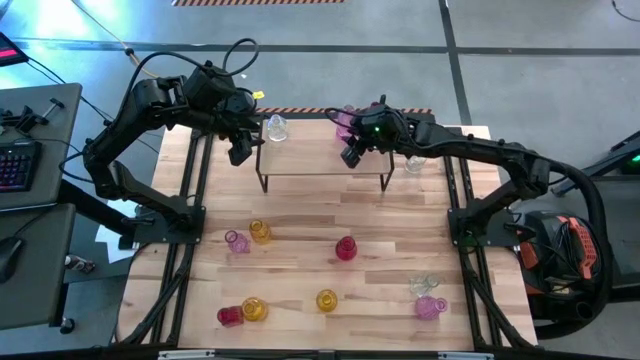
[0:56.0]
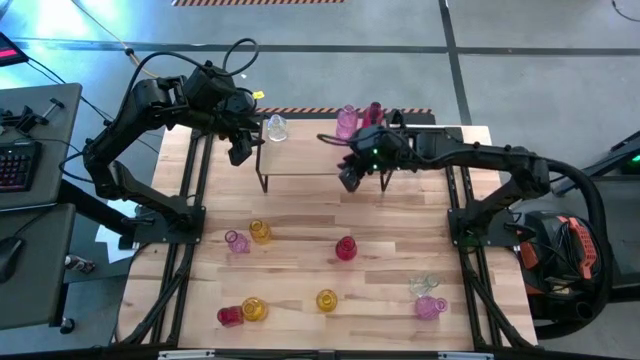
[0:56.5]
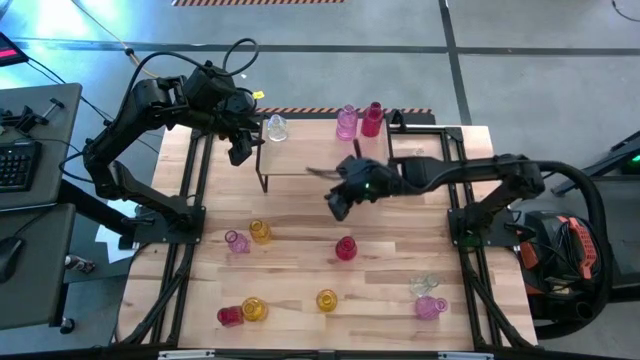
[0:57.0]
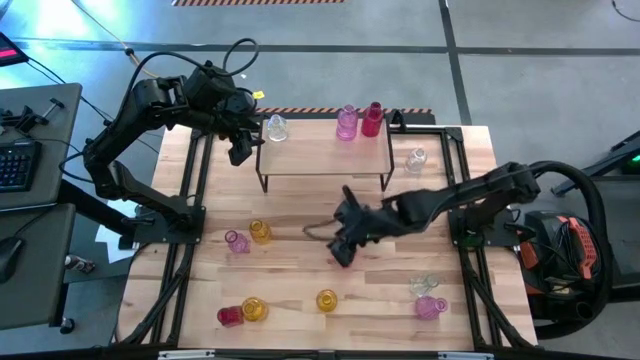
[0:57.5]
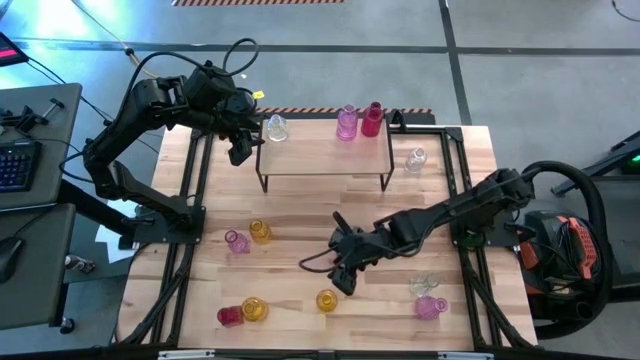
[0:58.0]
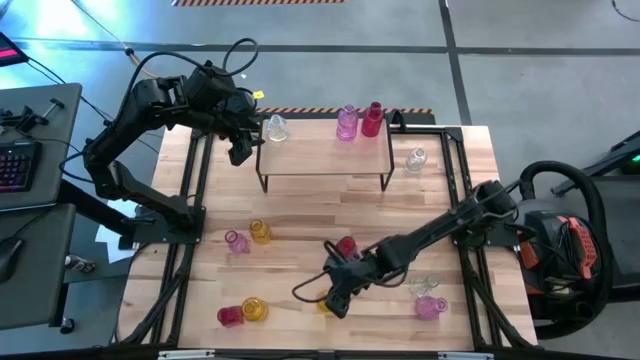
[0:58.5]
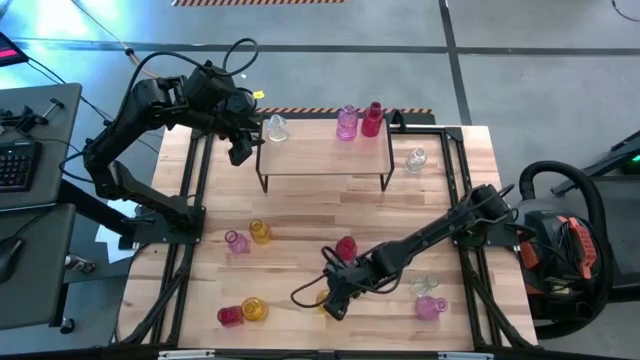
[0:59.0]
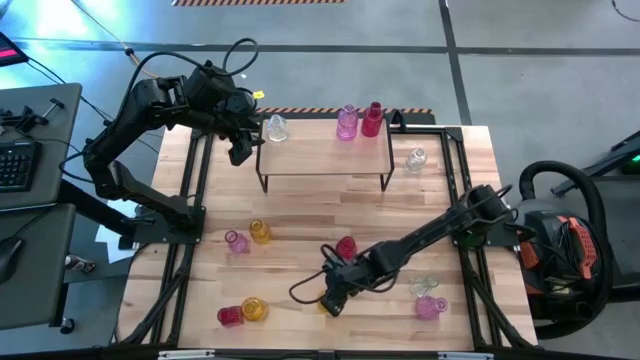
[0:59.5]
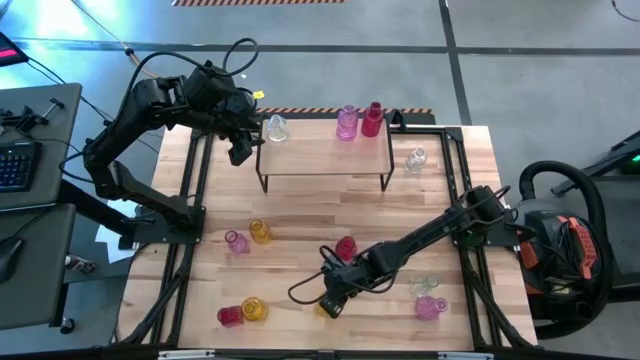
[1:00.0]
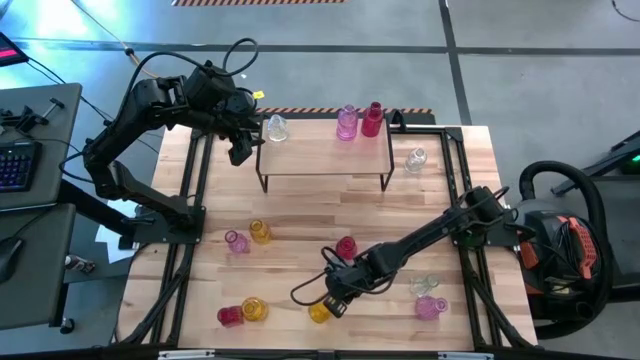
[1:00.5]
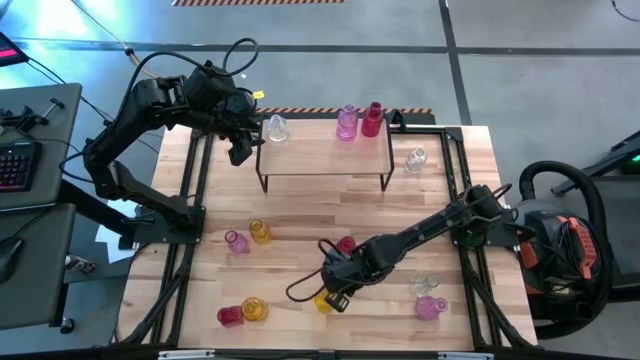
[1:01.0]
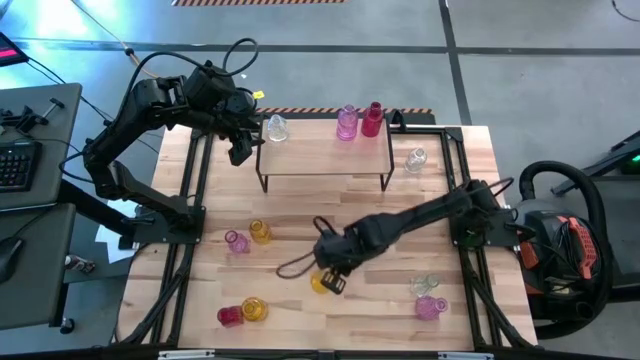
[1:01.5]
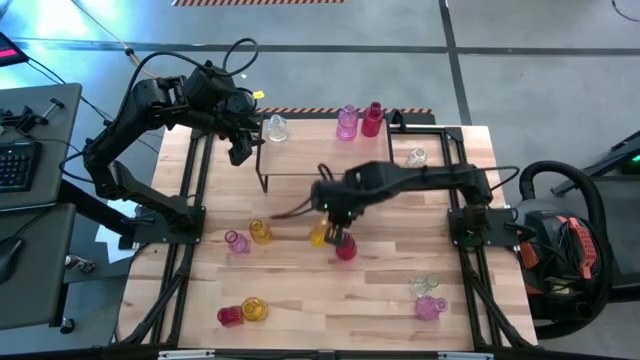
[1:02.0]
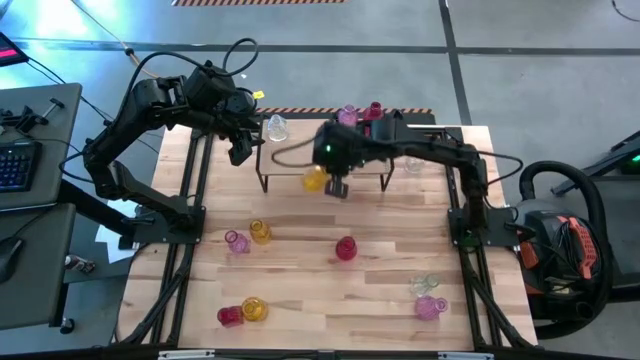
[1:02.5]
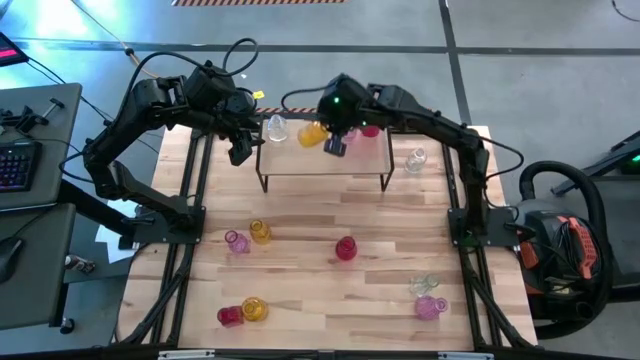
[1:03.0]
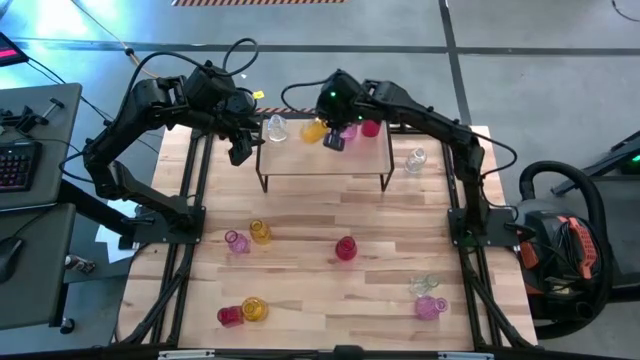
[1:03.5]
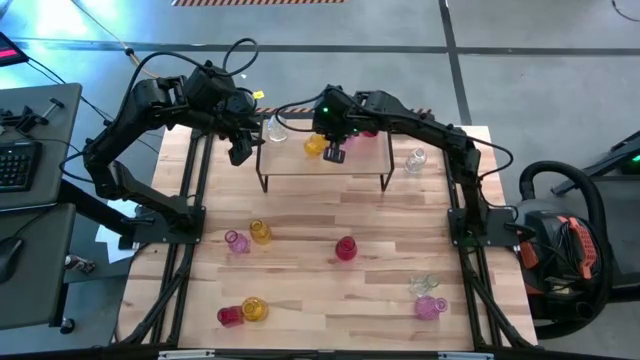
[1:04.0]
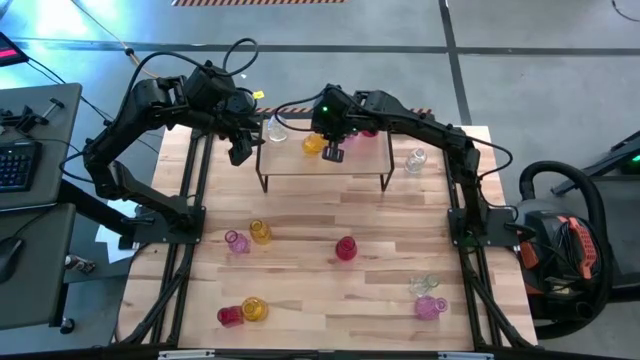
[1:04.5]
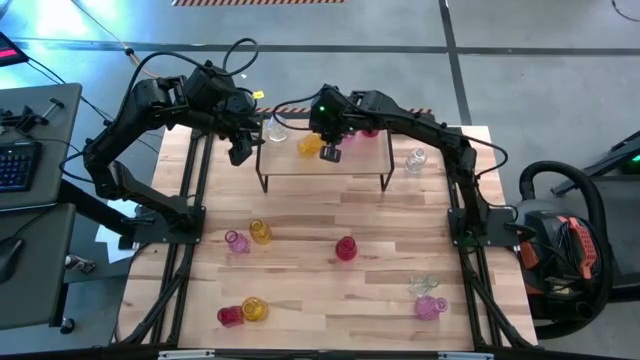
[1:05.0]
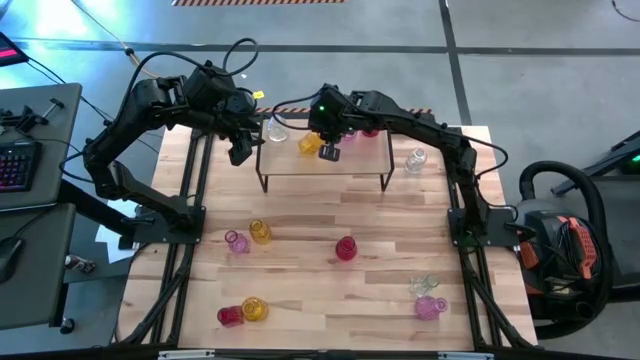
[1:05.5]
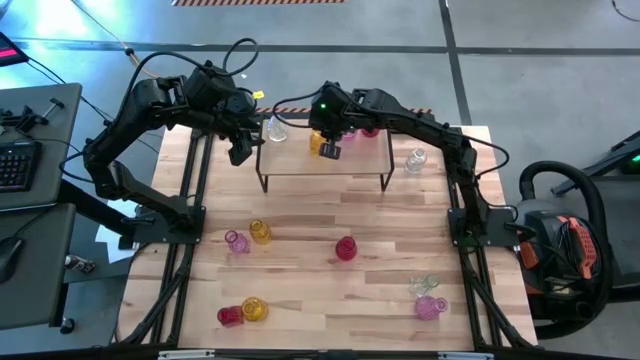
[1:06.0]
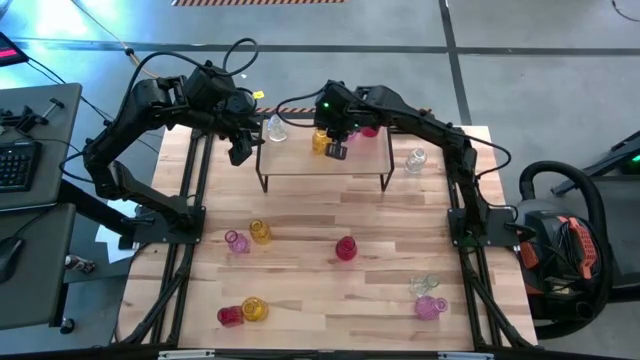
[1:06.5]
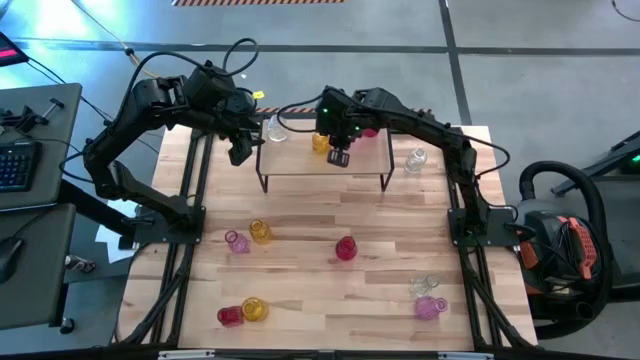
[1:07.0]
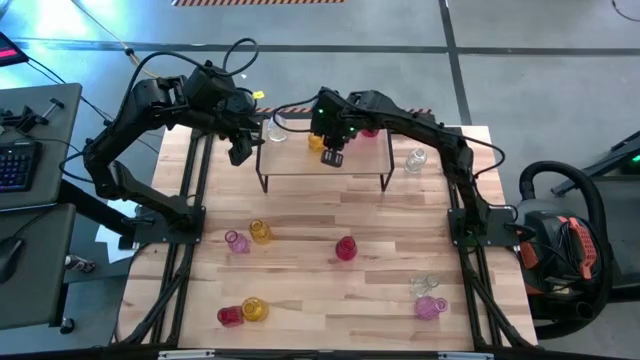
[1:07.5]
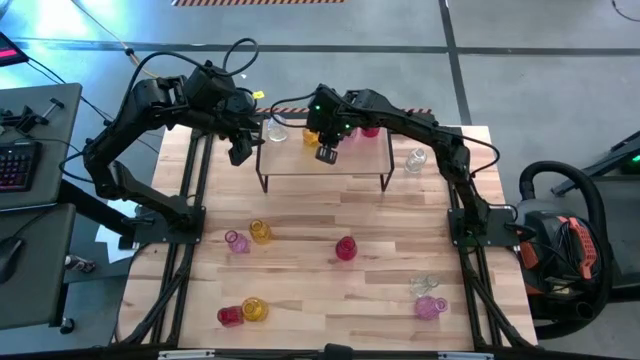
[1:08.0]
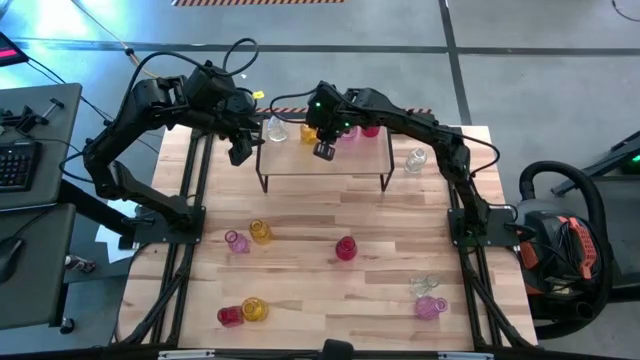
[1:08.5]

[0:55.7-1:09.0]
Task: sort vases onto shelf
Put the bottom right yellow vase on the shelf

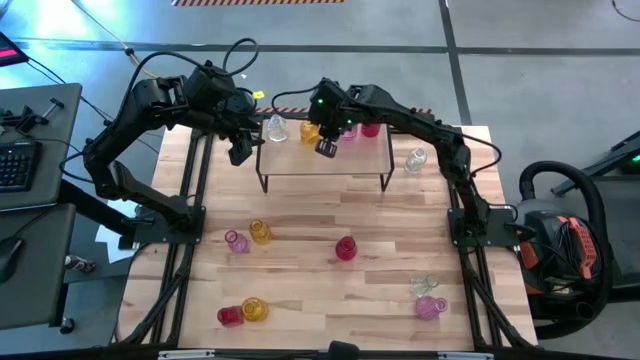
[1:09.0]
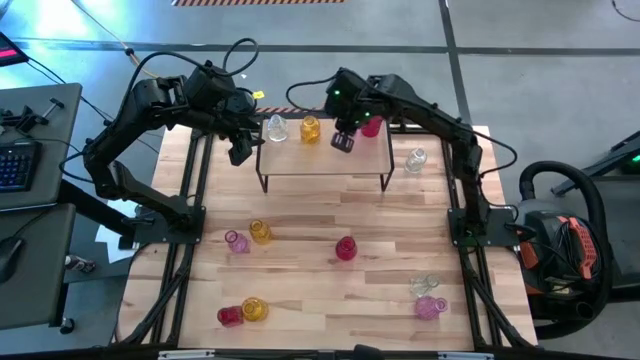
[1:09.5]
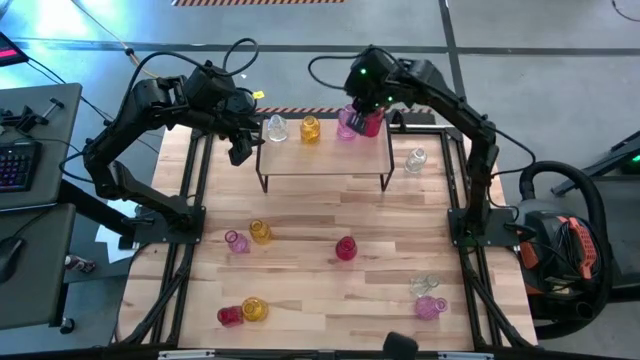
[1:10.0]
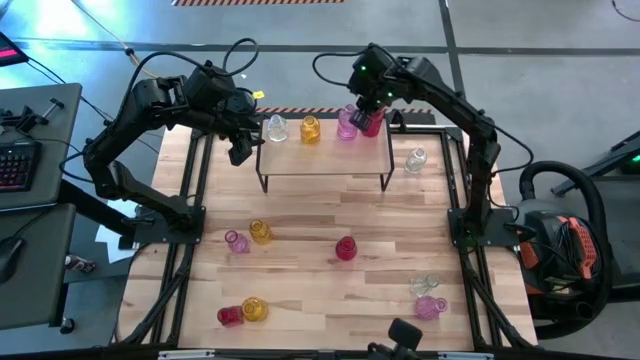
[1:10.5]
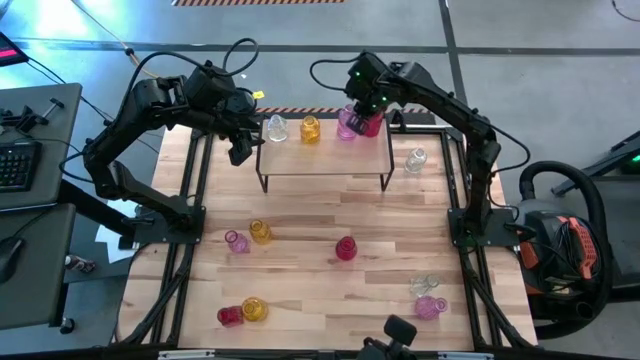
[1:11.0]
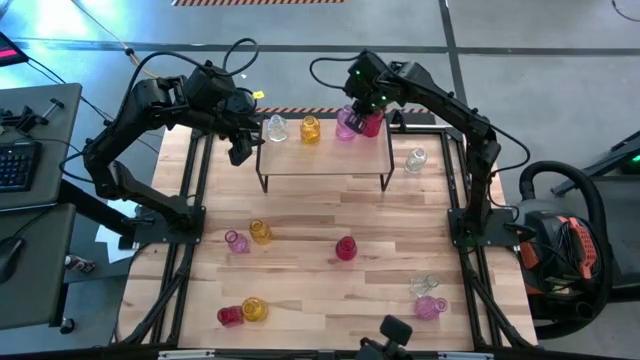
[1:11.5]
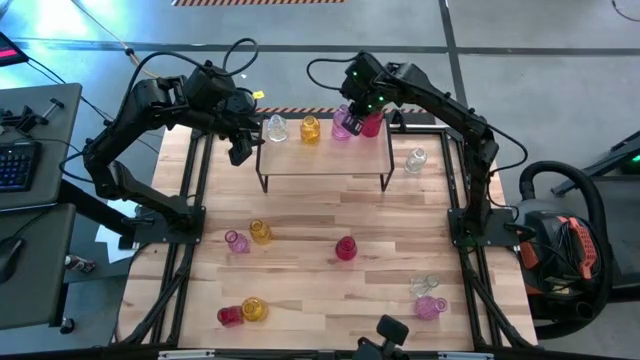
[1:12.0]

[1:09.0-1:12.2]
Adjust the violet vase on the shelf

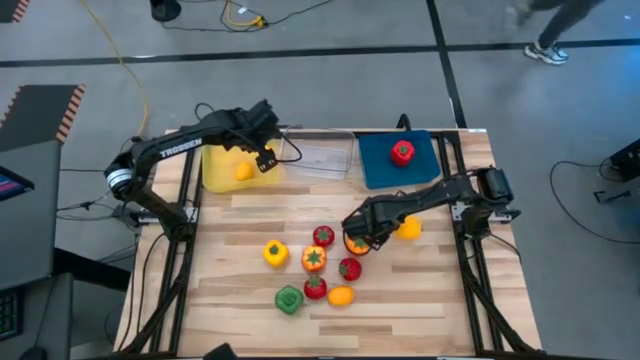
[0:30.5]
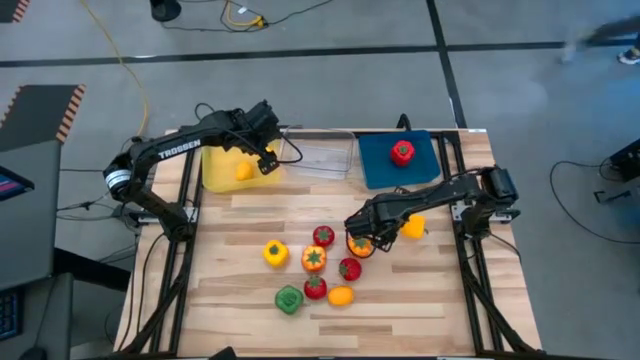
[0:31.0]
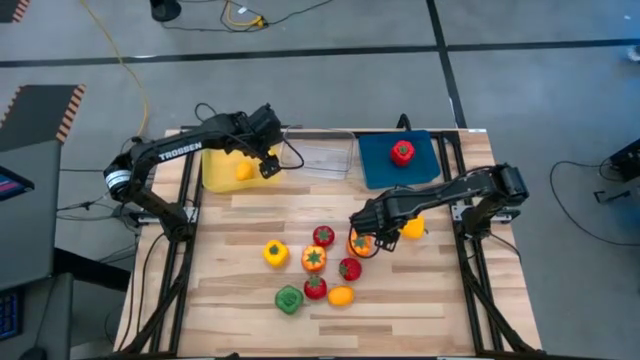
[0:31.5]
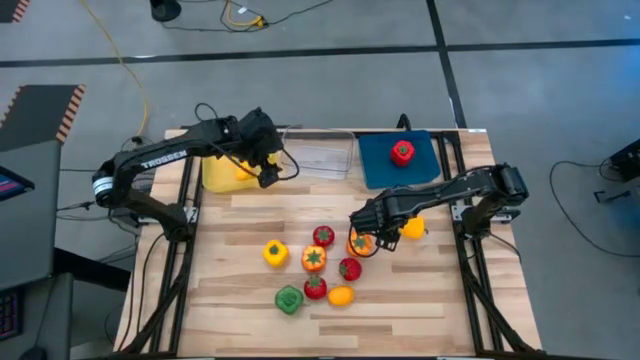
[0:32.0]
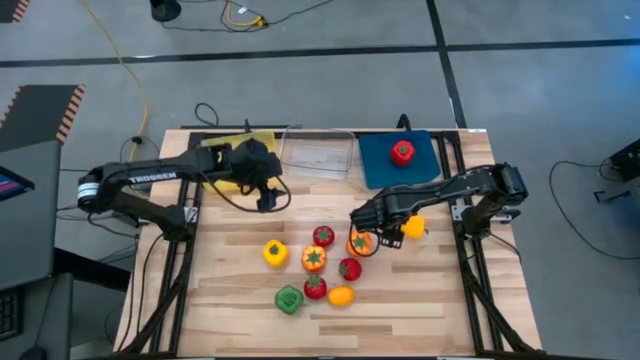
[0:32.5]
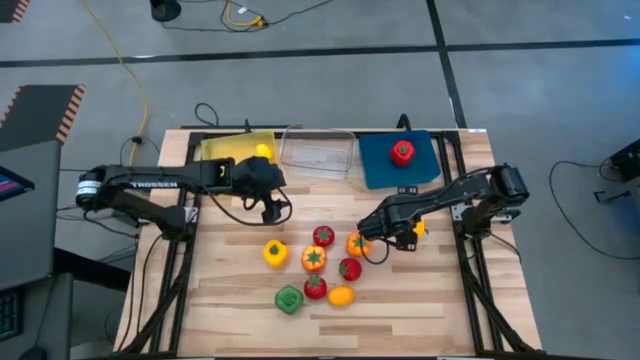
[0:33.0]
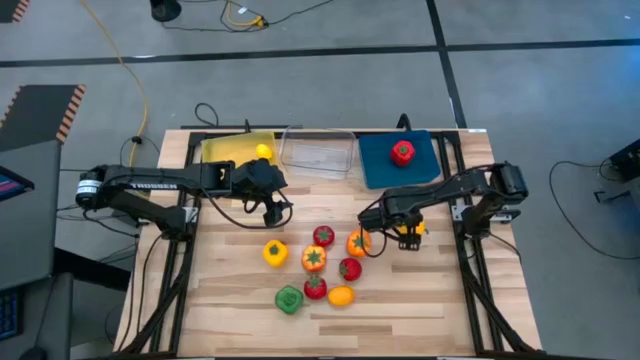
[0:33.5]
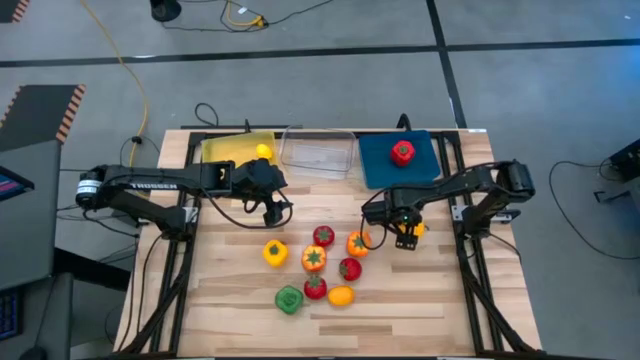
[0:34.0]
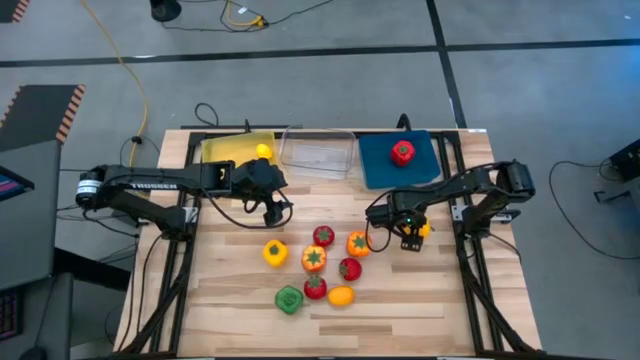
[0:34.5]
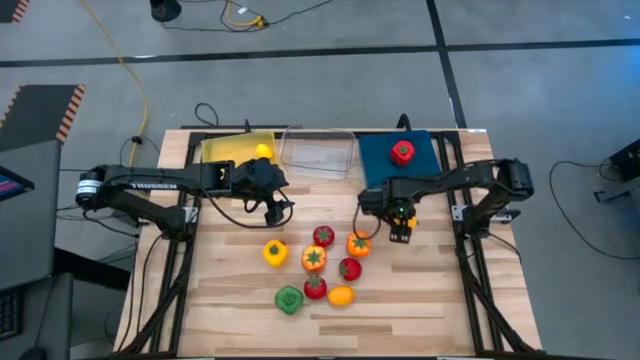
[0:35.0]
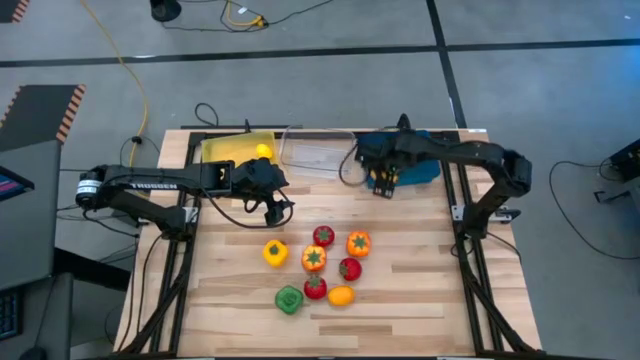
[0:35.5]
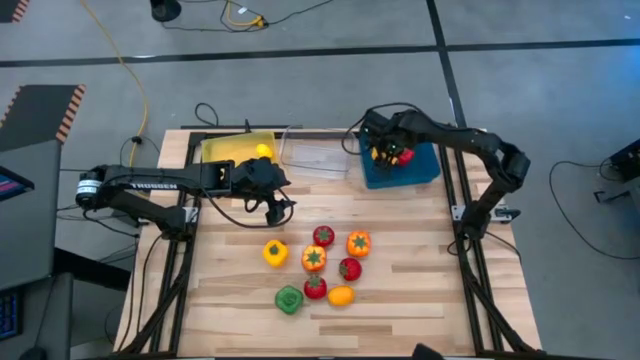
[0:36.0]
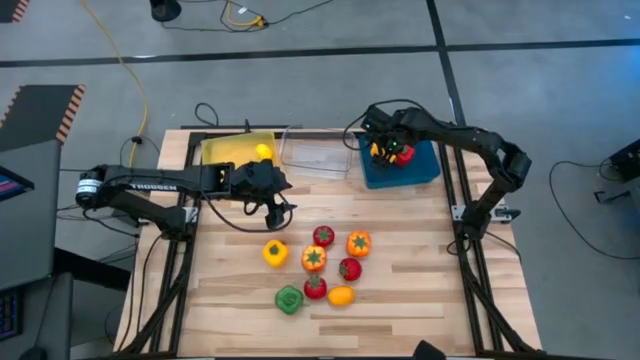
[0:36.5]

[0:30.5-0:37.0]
Task: Sort produce into baskets
Put the right yellow bell pepper into the blue bin
